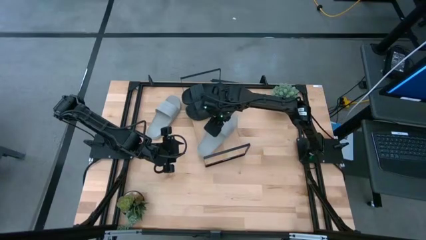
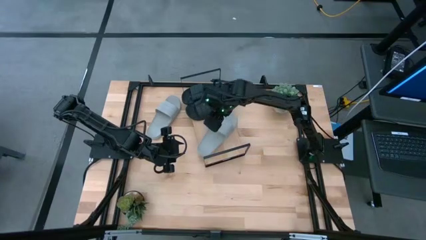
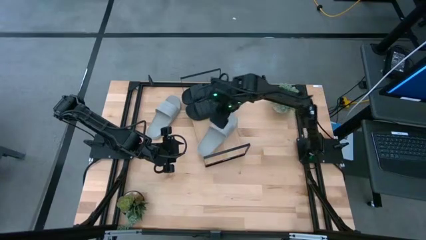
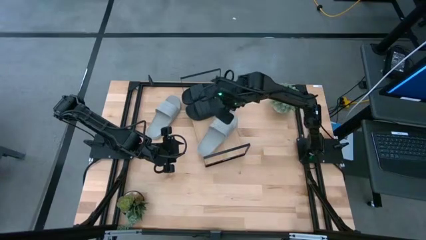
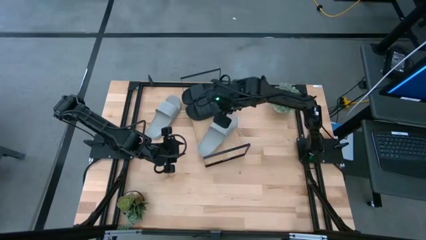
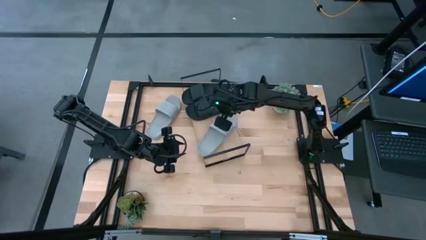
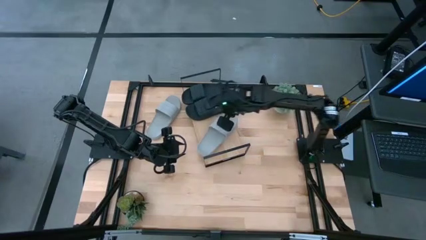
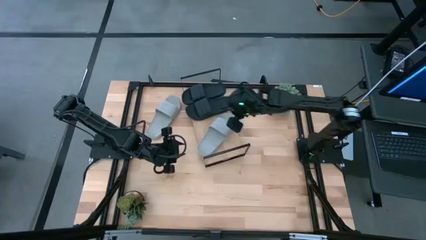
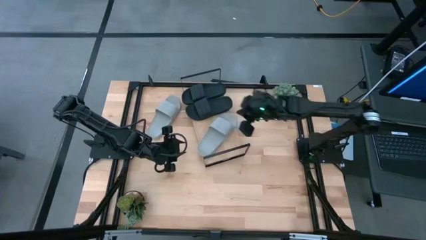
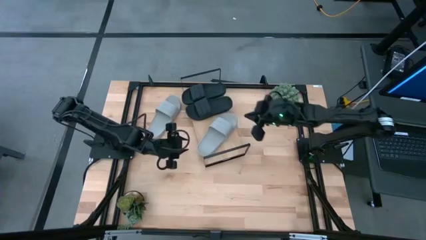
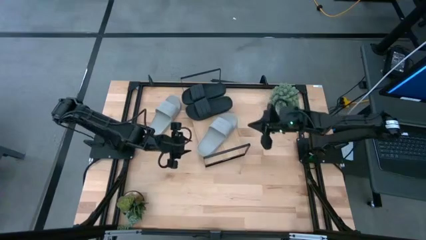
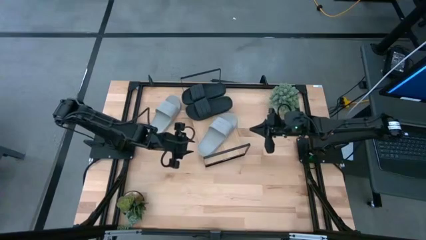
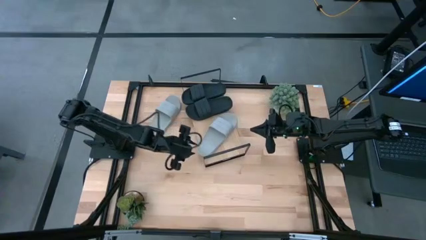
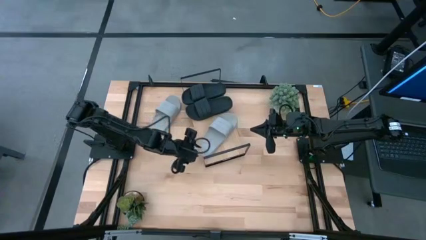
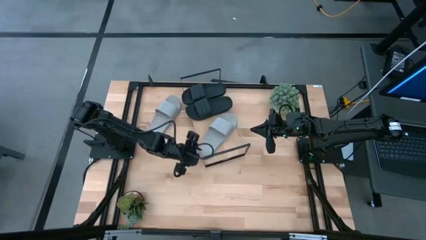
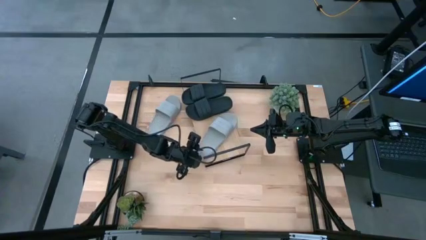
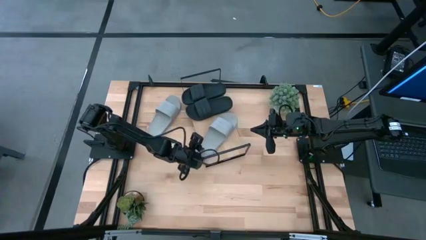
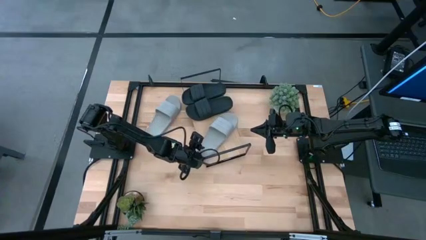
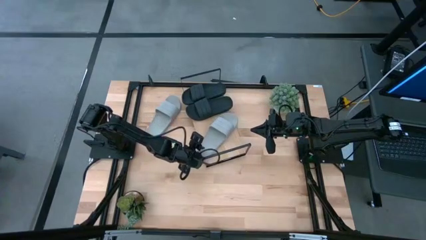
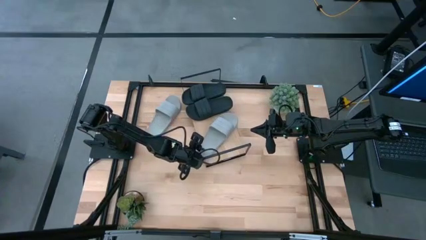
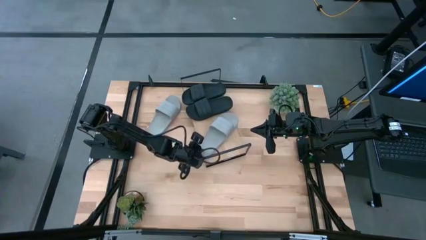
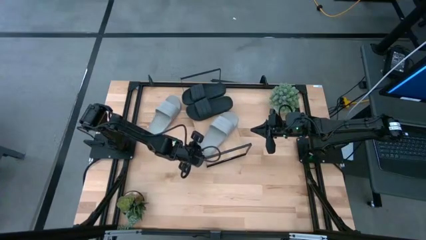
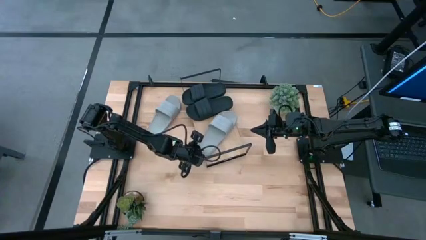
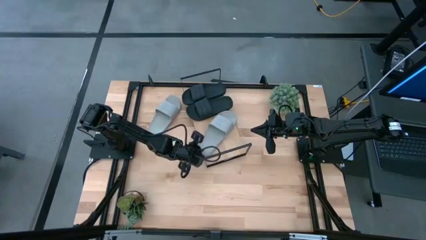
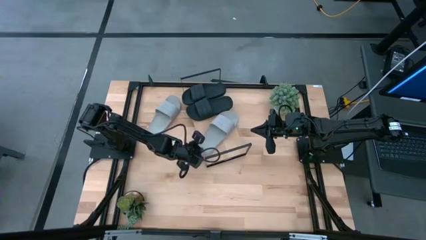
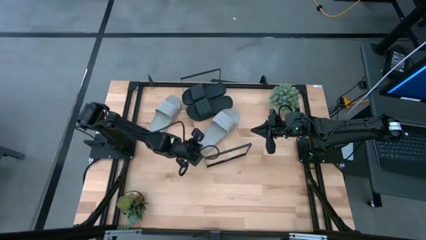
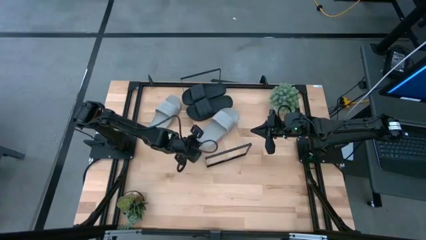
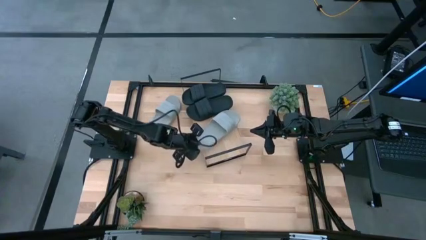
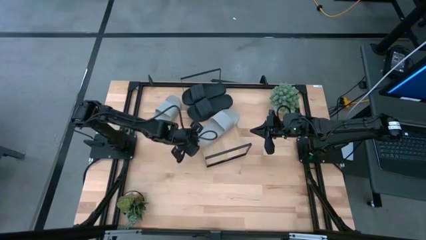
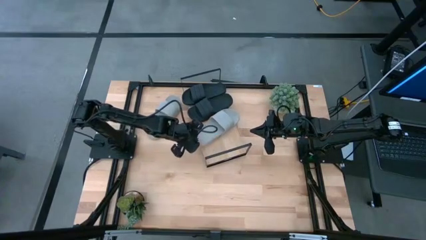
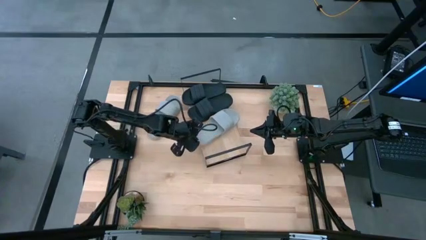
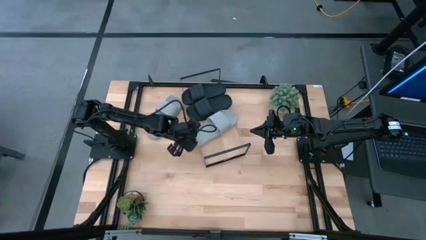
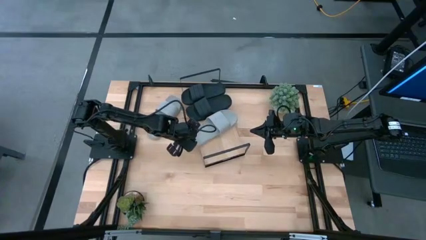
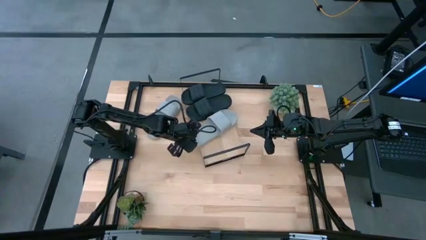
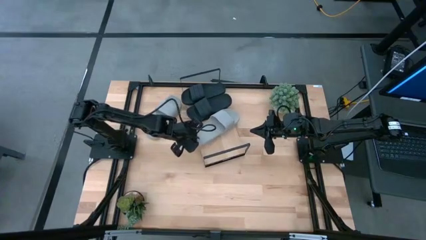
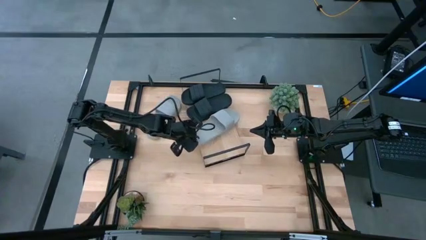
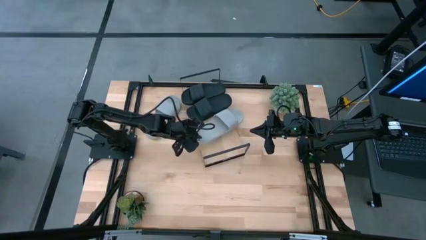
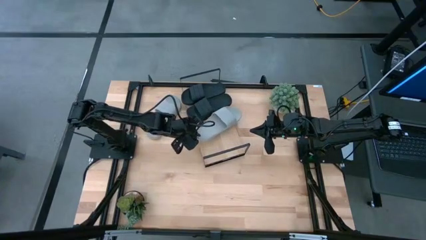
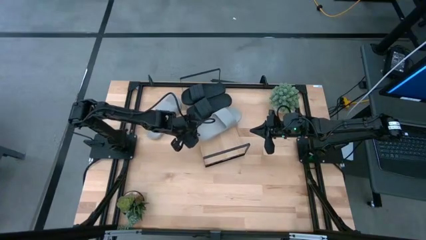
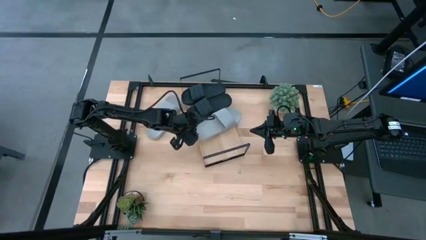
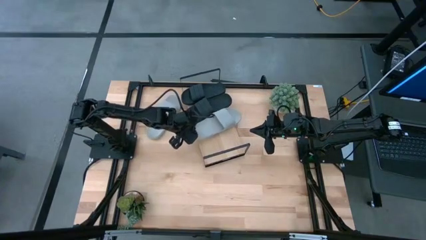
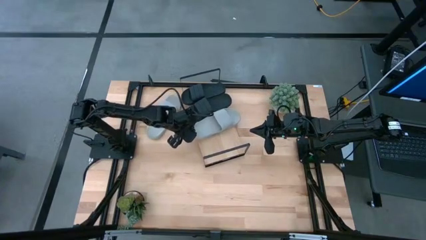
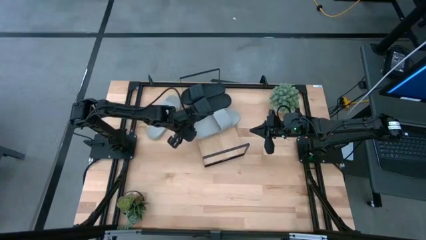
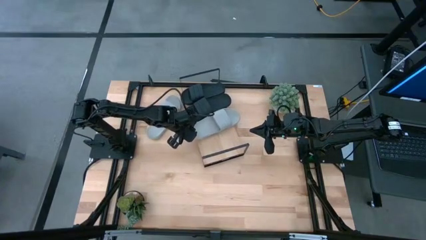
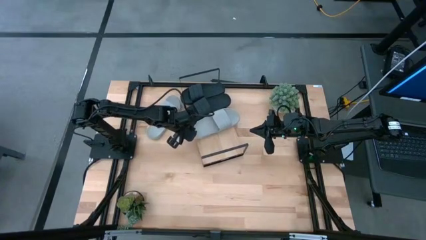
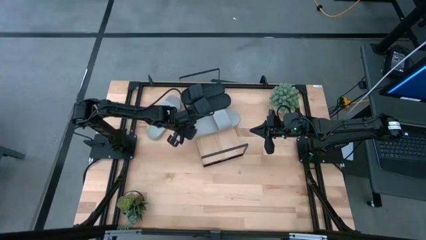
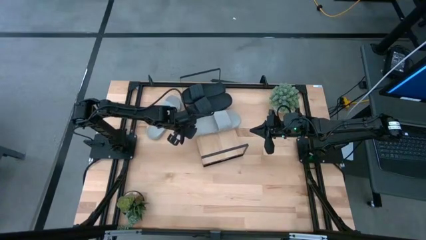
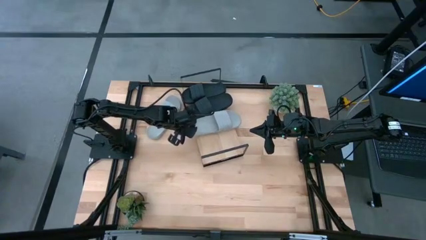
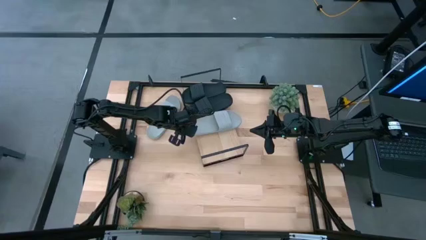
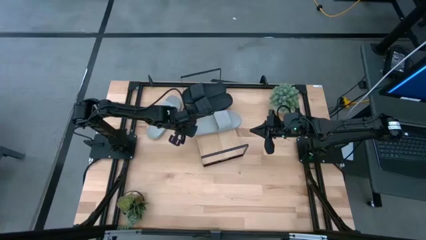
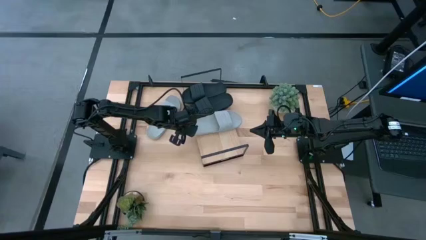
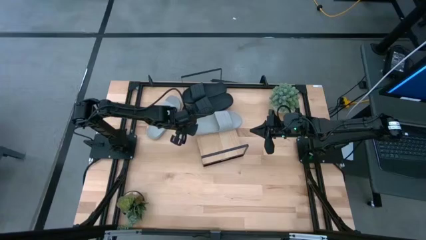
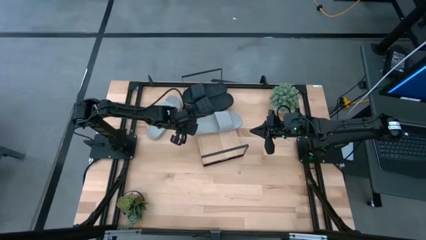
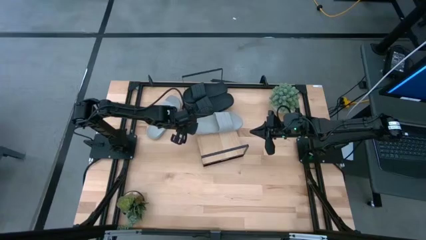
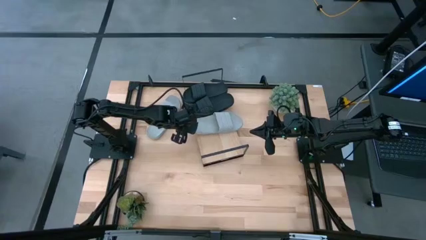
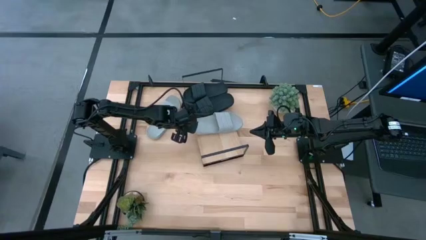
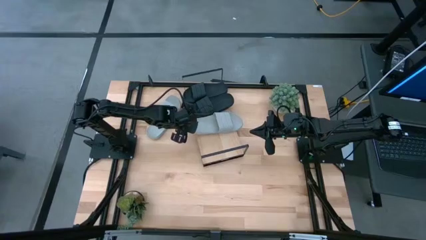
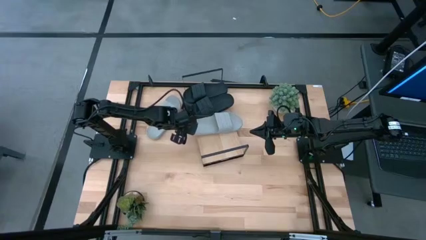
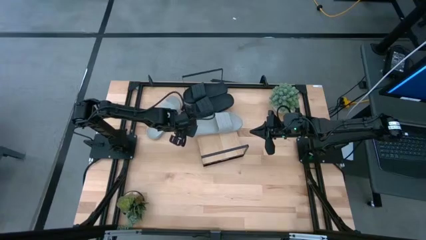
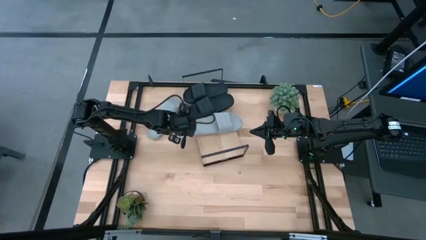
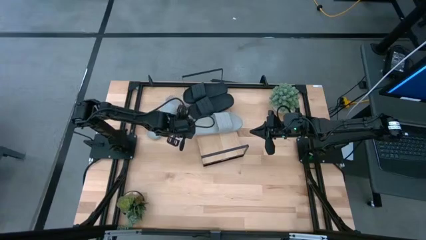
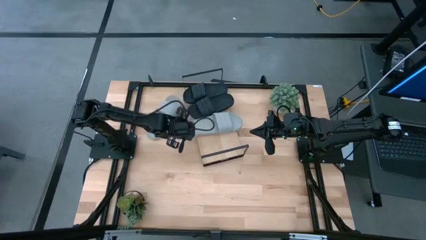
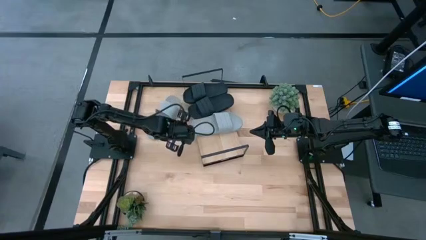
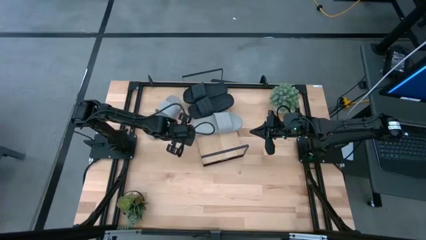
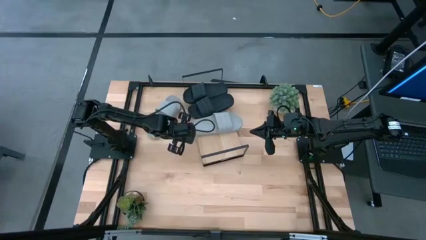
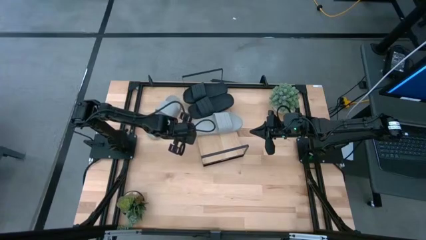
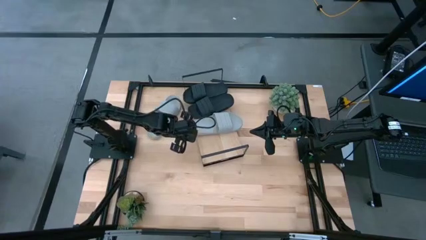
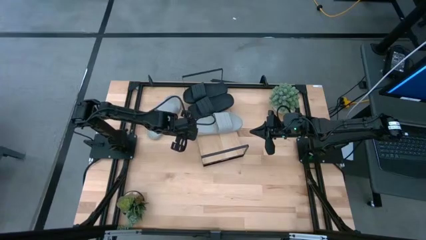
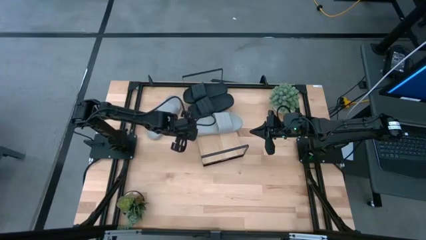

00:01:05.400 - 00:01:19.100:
Task: Pick and place slides into the shelf
Put the right gray slide on the shelf

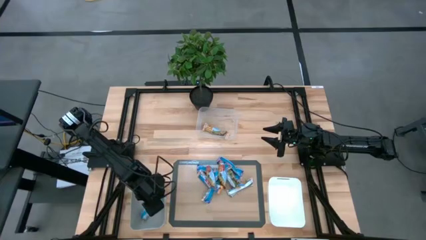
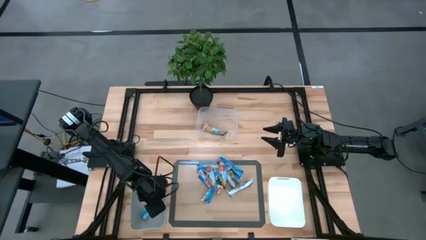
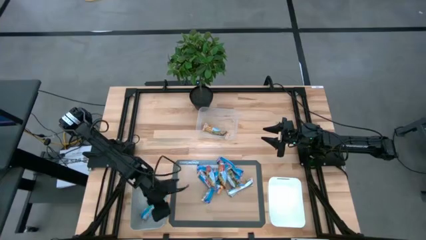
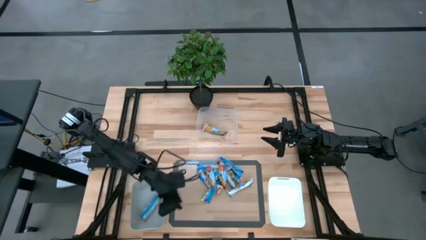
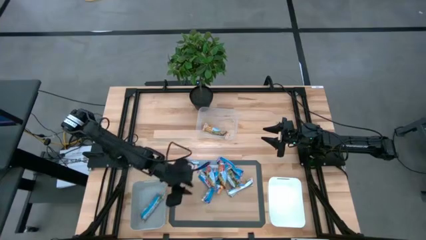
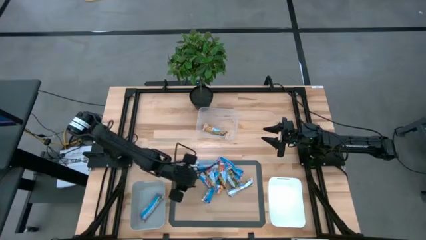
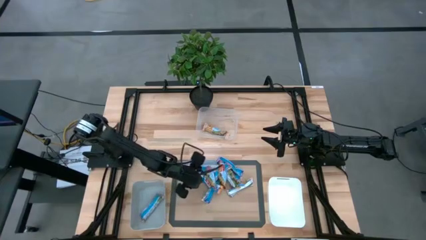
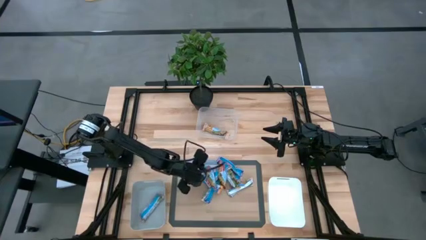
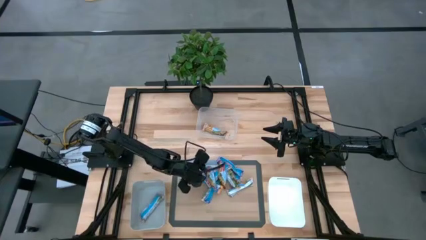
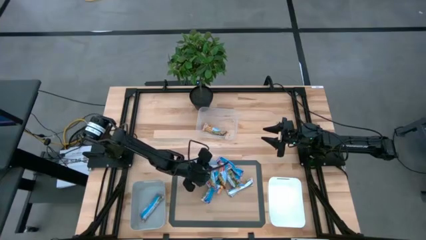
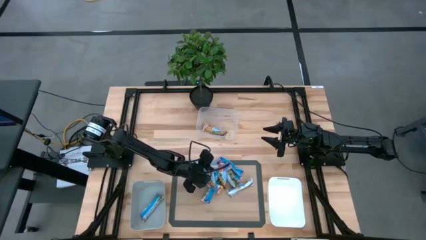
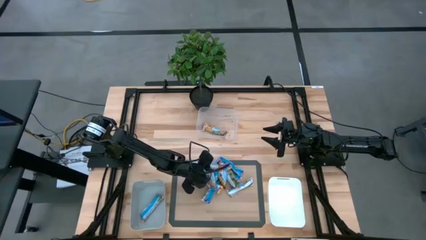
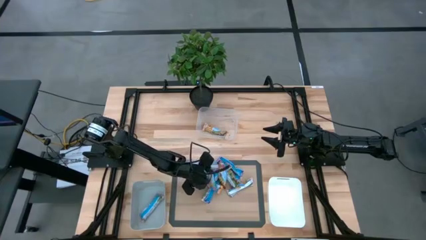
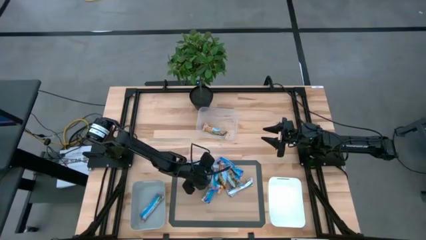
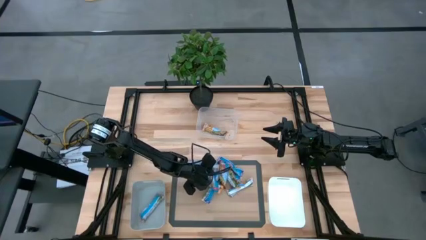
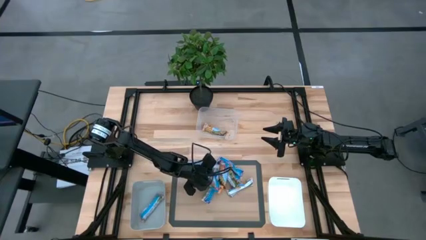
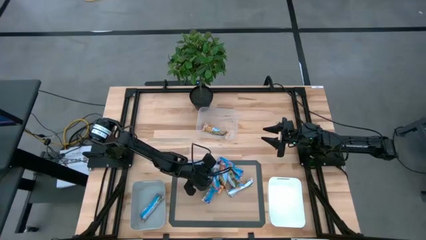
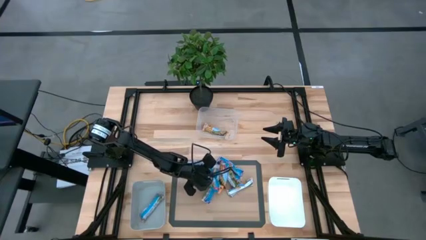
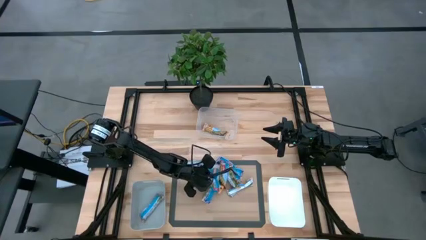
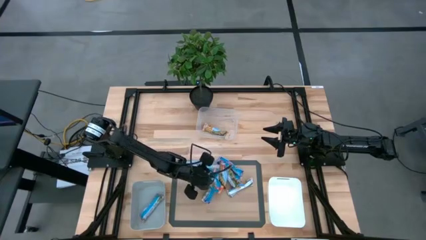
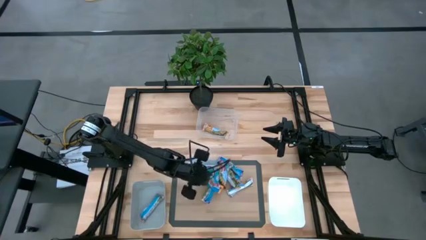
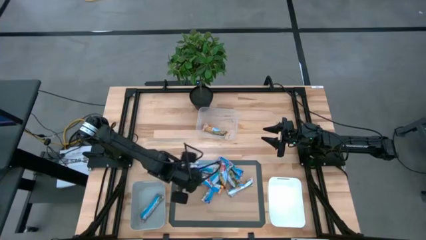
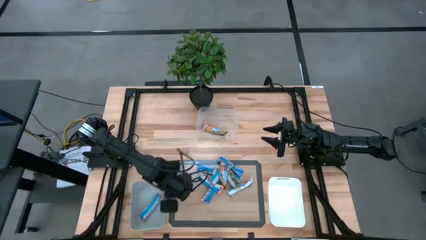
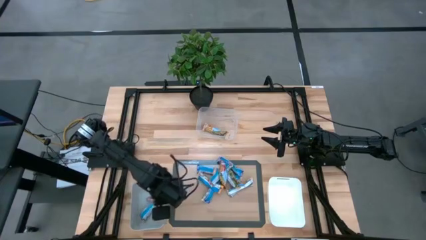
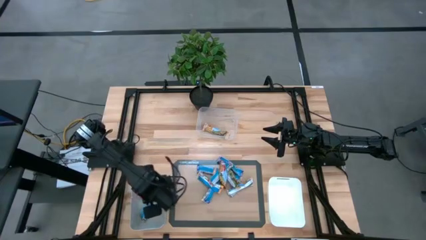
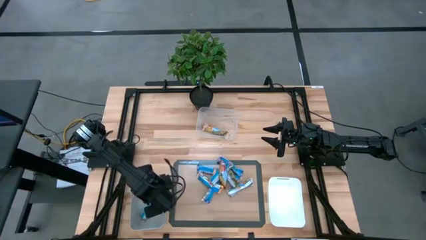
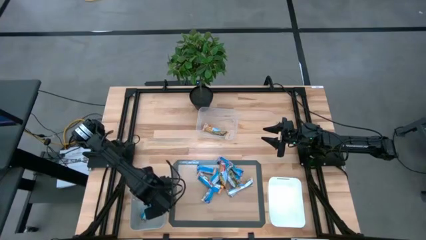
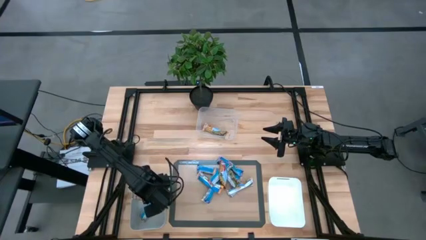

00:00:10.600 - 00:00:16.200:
Task: Pick and place Granola Bars by type
Put the red granola bar into the gray bin
